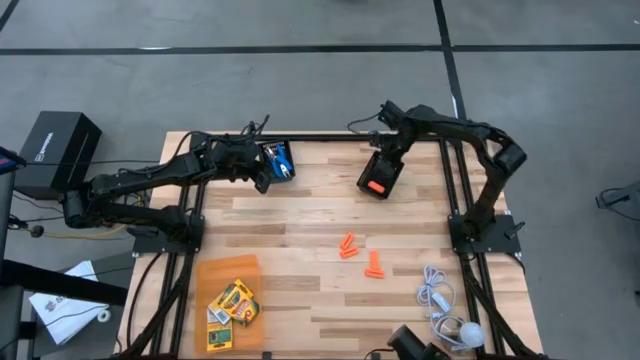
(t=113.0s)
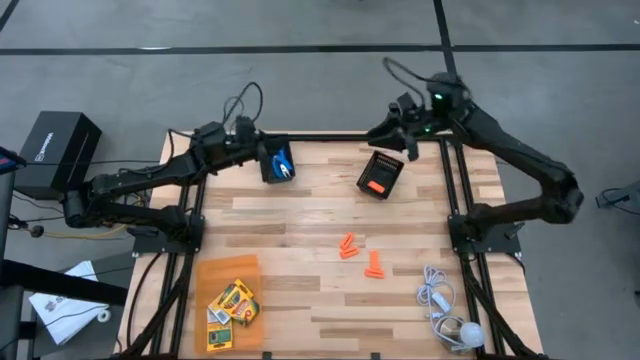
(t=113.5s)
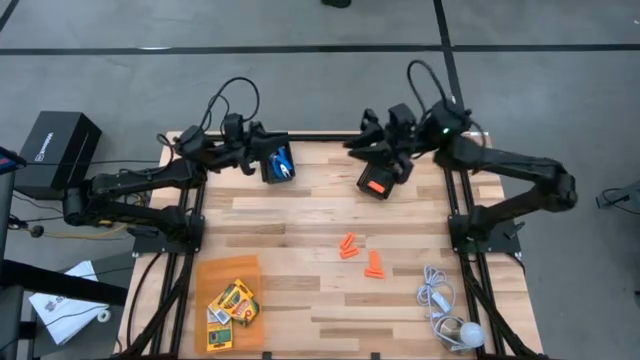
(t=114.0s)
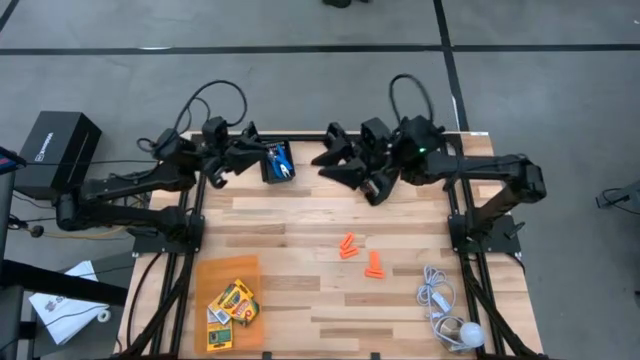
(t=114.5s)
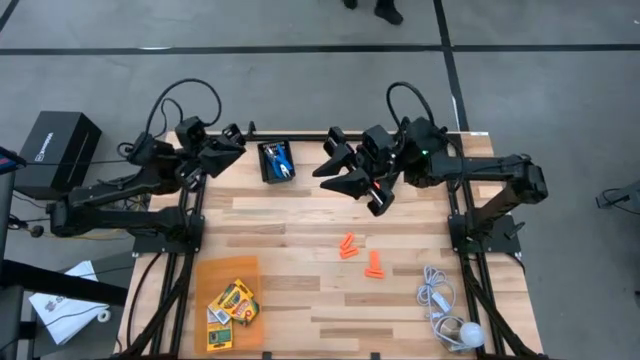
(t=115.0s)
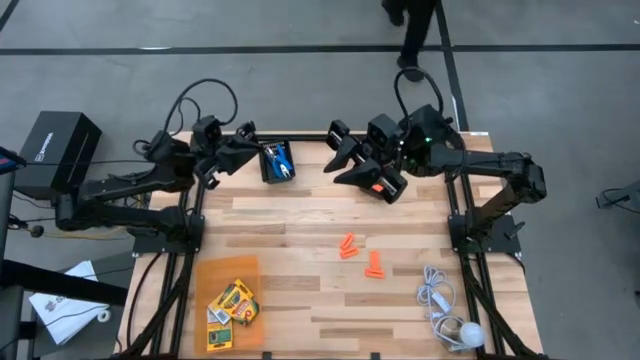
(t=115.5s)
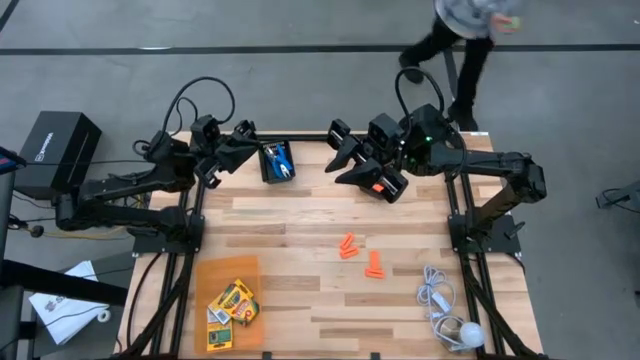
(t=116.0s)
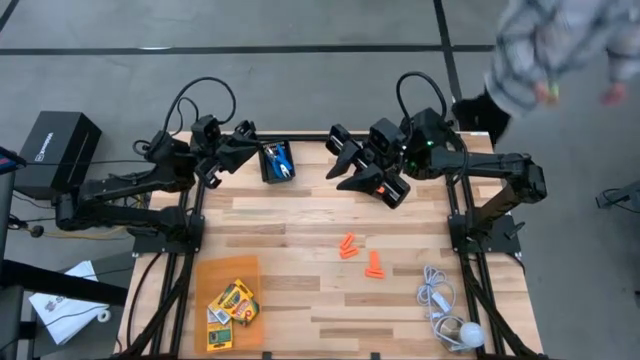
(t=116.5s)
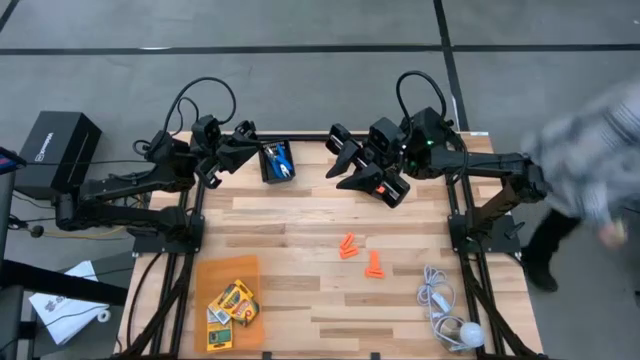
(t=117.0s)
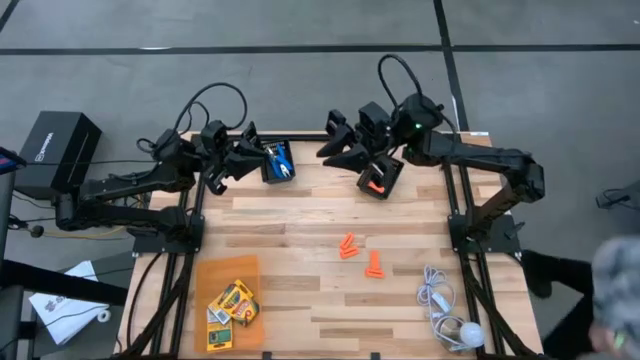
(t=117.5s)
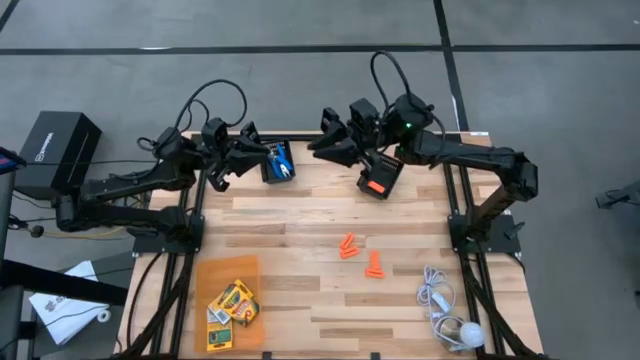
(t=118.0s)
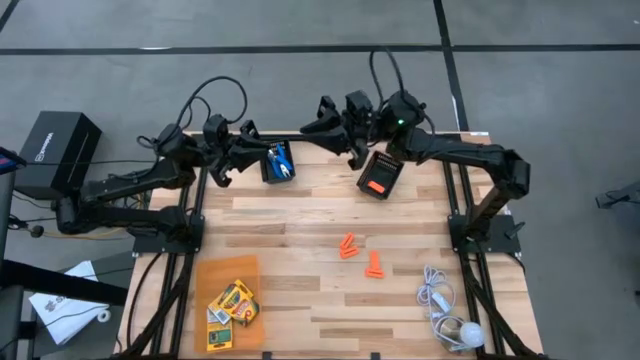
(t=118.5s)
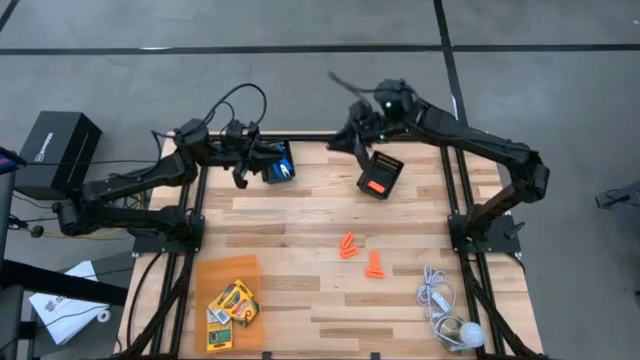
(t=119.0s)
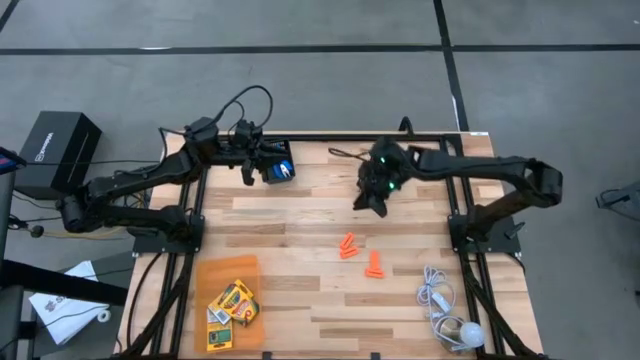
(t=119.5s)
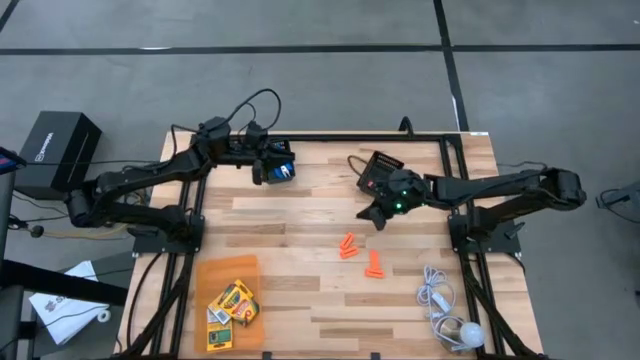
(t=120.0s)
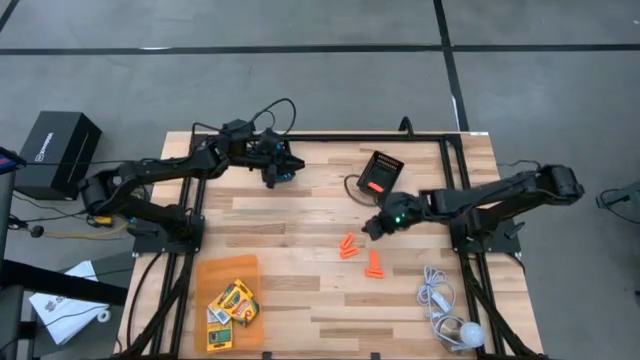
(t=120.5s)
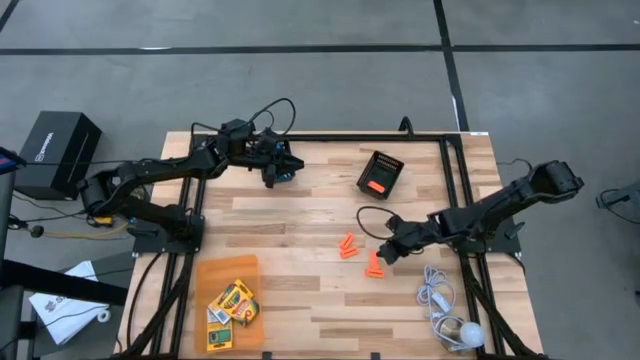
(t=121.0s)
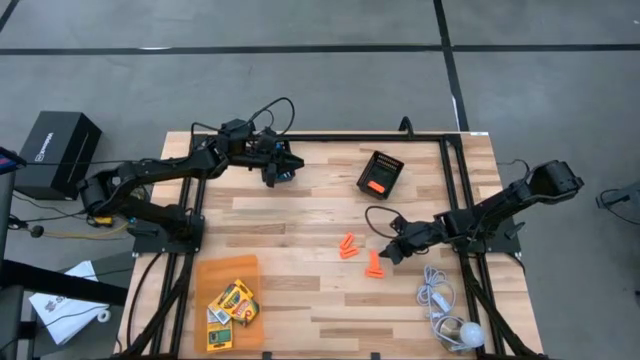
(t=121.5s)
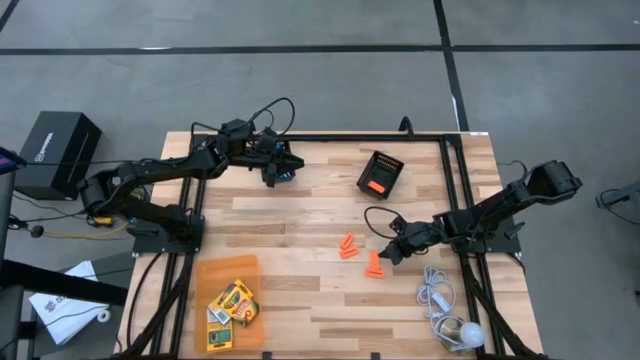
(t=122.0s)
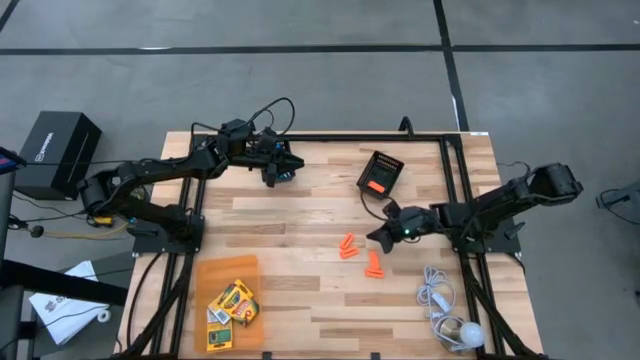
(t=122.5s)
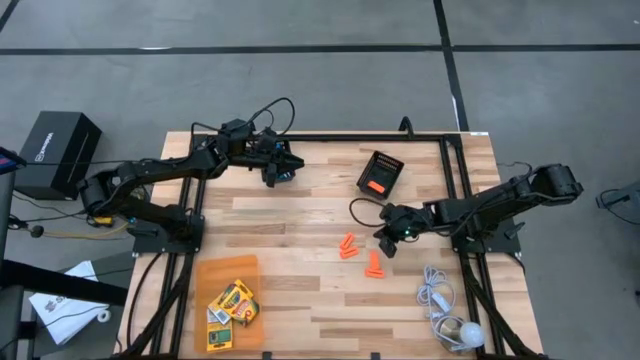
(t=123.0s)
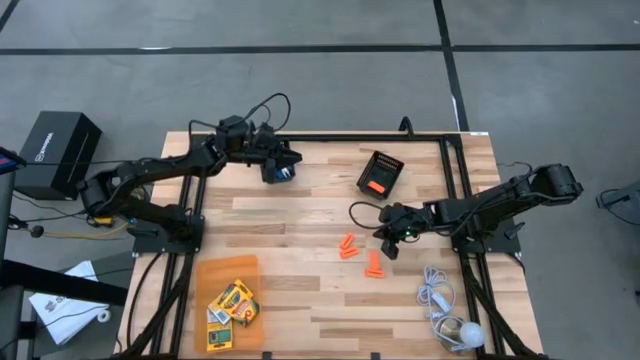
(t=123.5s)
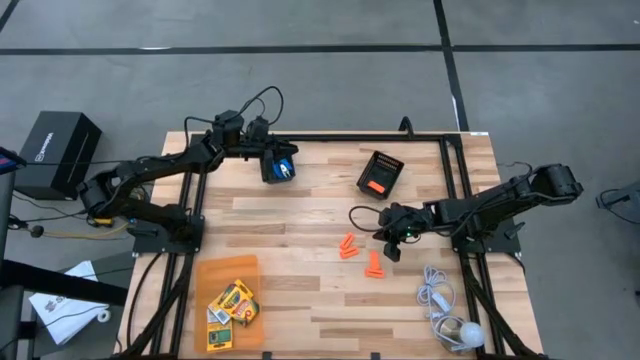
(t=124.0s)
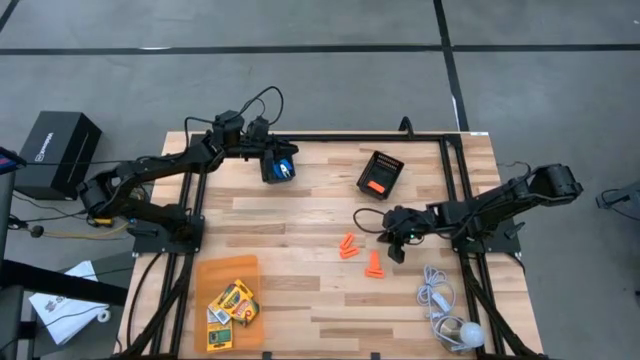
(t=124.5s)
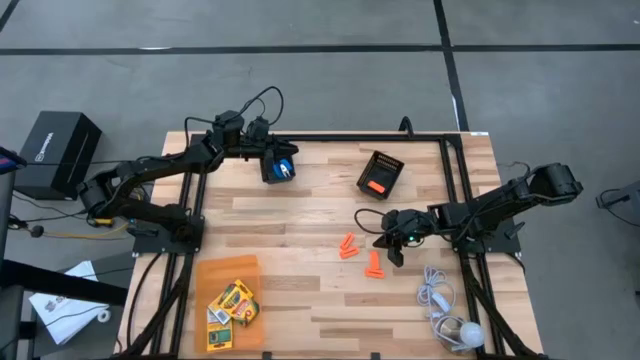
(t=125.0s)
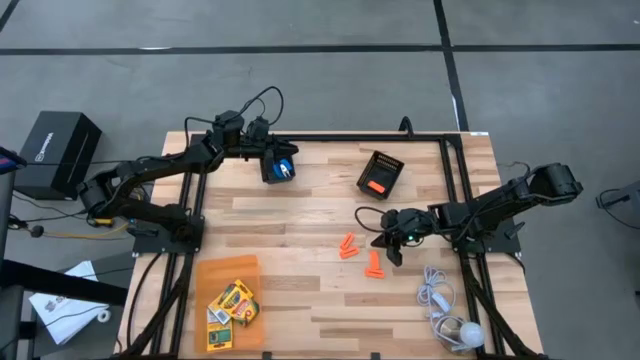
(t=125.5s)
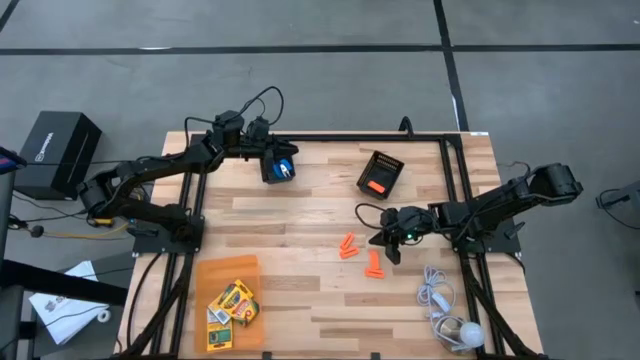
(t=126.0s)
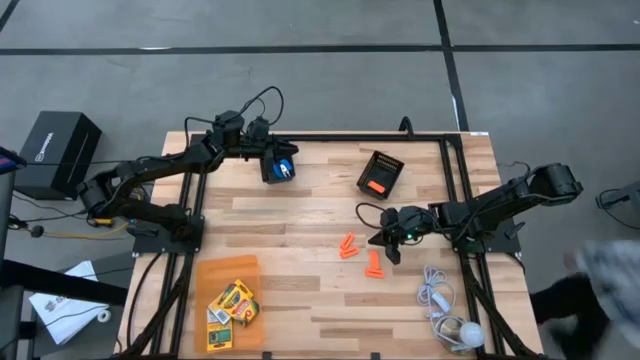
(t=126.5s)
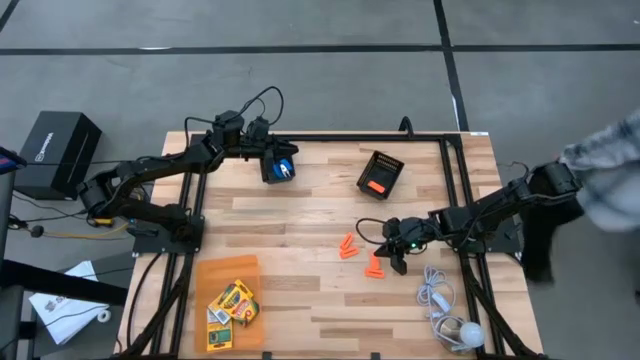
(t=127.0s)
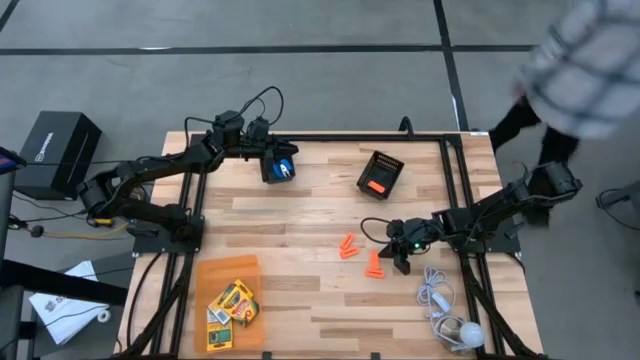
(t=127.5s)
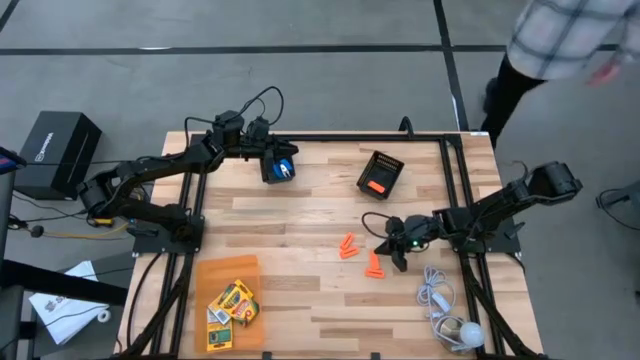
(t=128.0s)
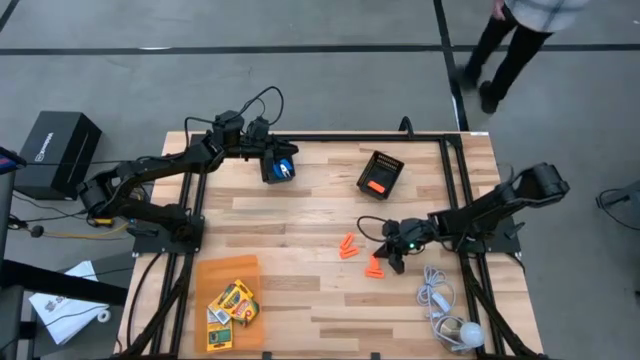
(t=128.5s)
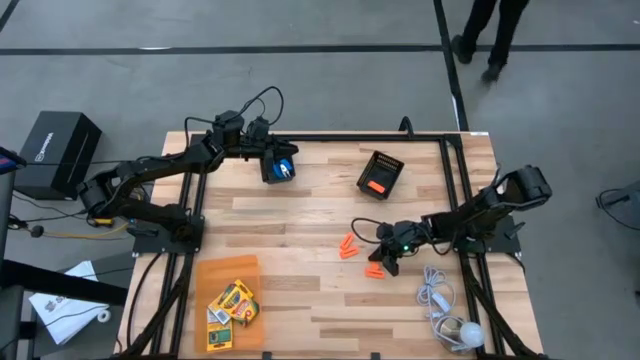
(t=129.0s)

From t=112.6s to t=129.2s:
Task: Pick & Place School Supplies
Put the orange eraser into the right black bin

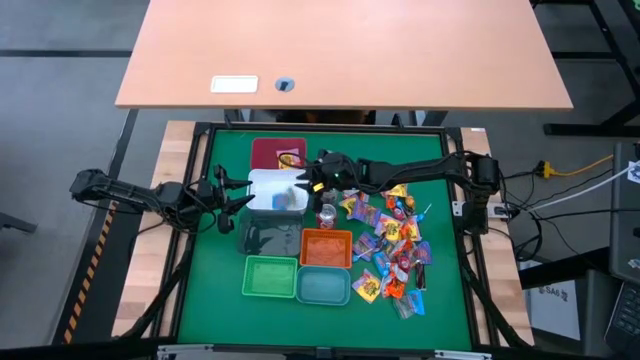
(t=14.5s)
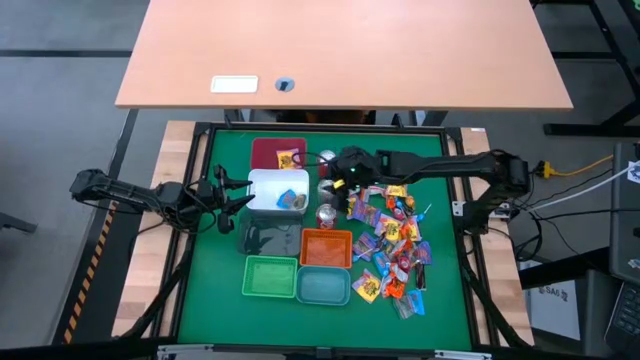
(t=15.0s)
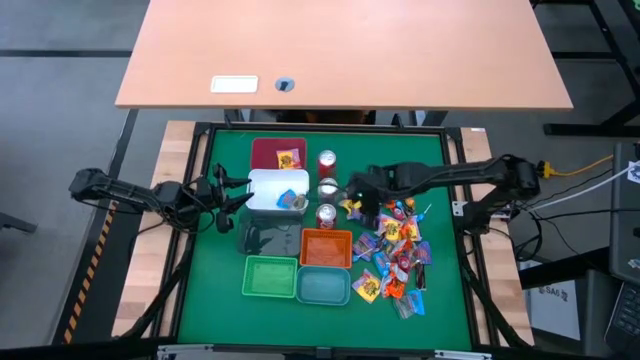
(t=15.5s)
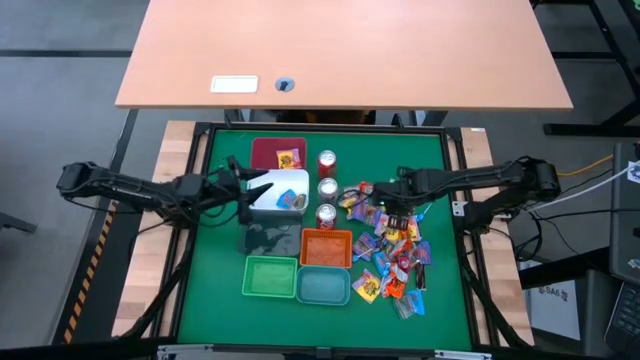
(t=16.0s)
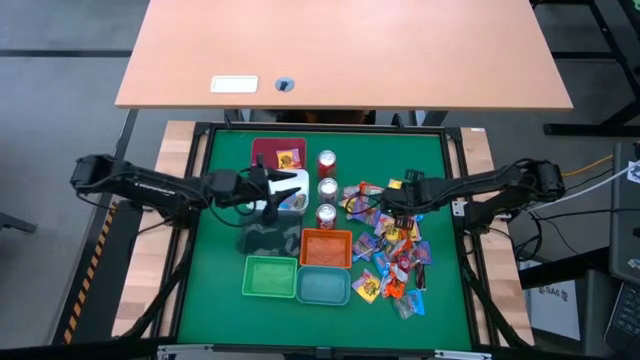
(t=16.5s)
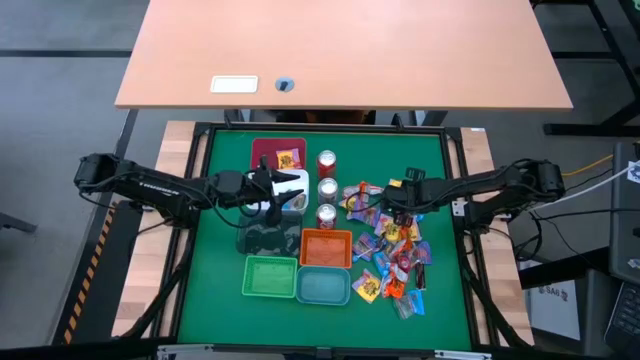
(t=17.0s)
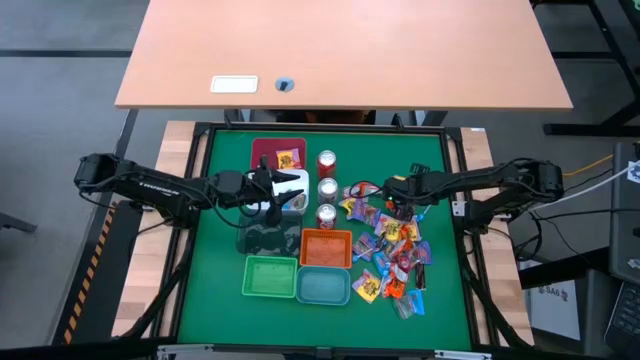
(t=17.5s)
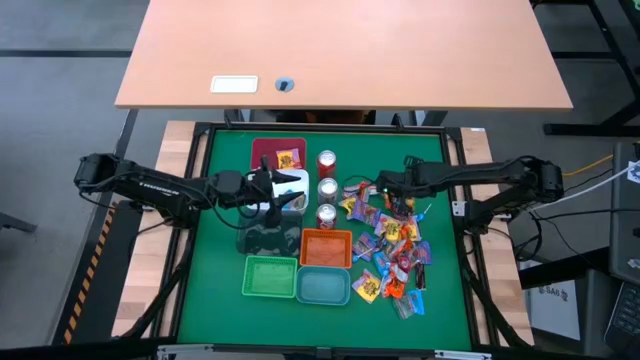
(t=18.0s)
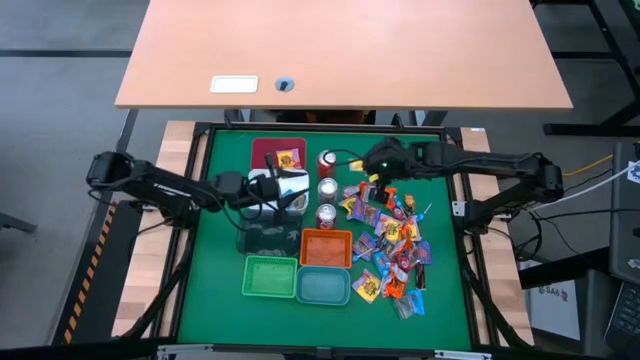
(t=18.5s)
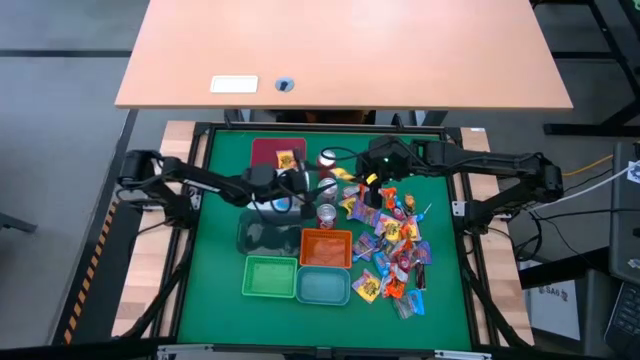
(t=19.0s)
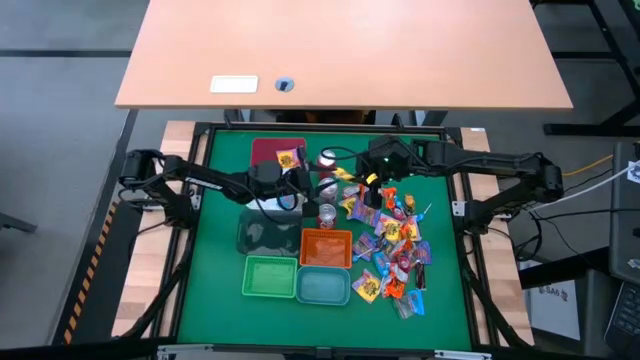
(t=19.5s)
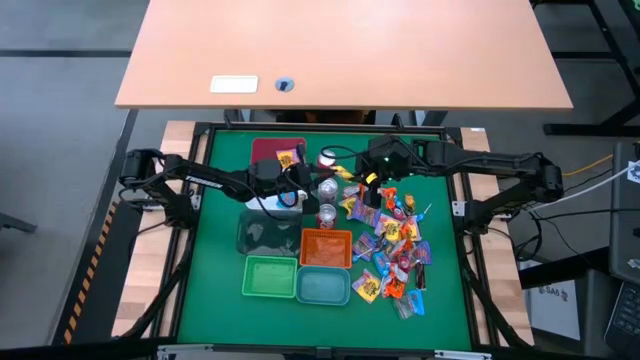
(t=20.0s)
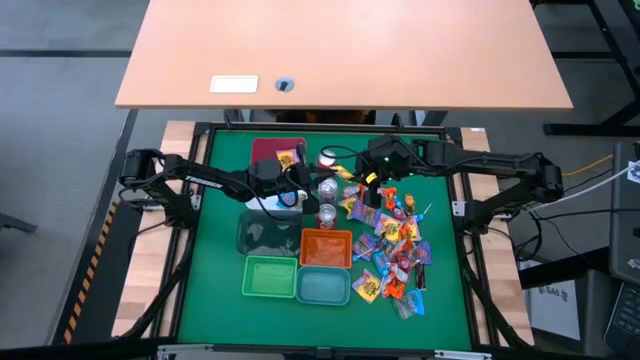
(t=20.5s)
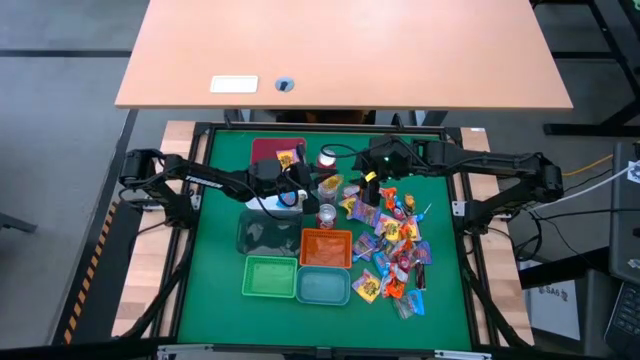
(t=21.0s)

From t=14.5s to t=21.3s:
Task: Sort candy
Put the yellow candy into the red bin
